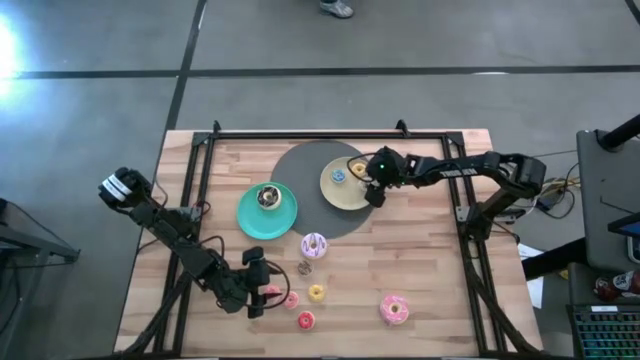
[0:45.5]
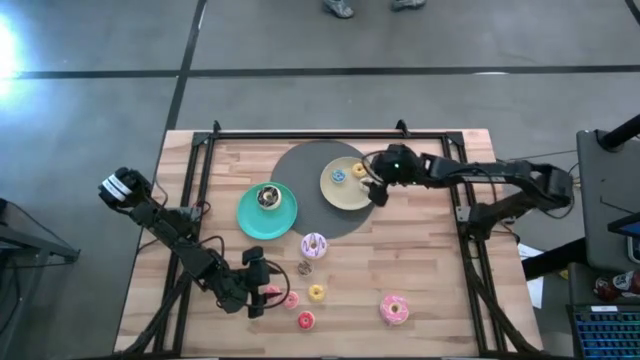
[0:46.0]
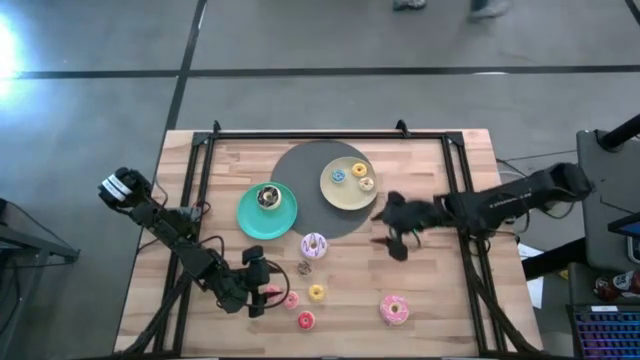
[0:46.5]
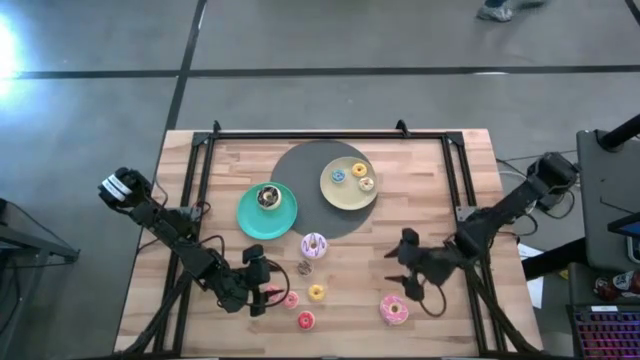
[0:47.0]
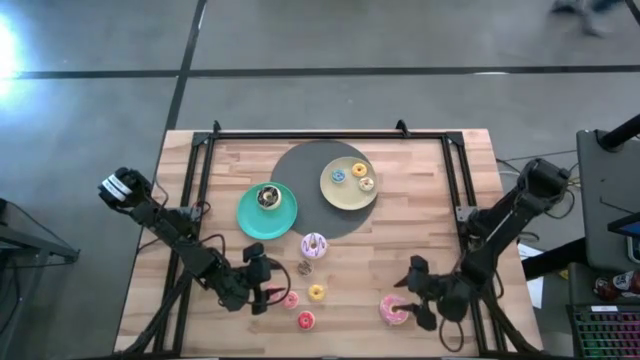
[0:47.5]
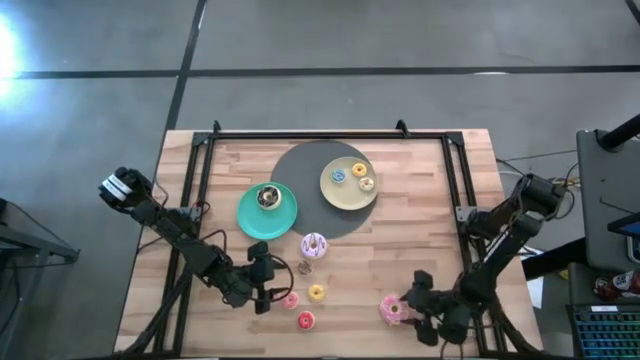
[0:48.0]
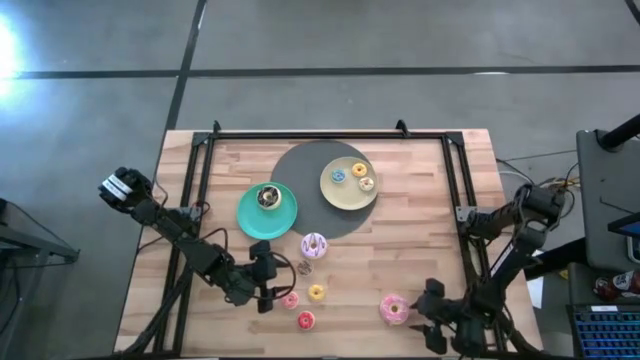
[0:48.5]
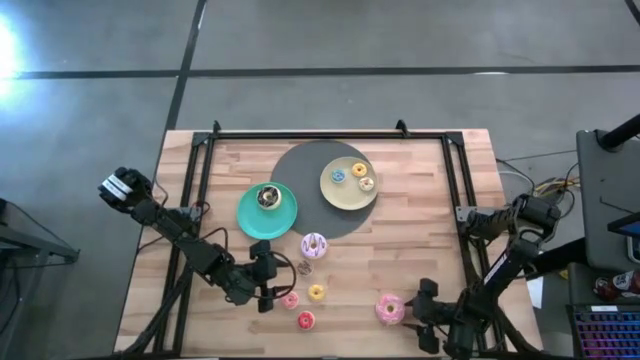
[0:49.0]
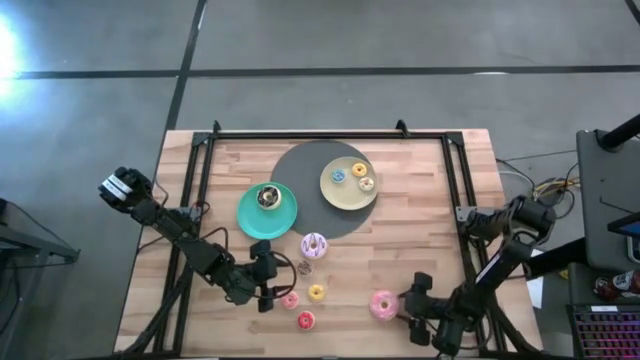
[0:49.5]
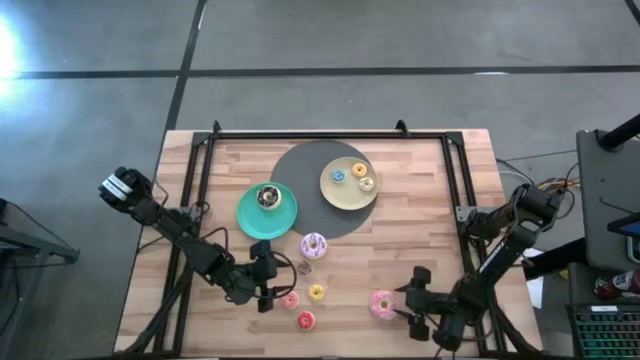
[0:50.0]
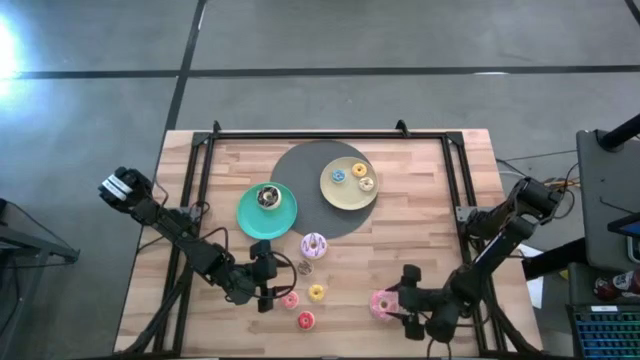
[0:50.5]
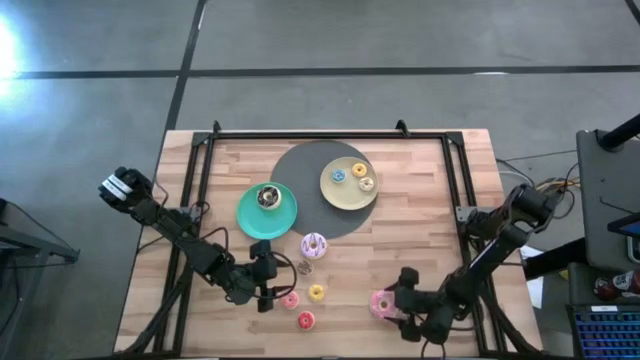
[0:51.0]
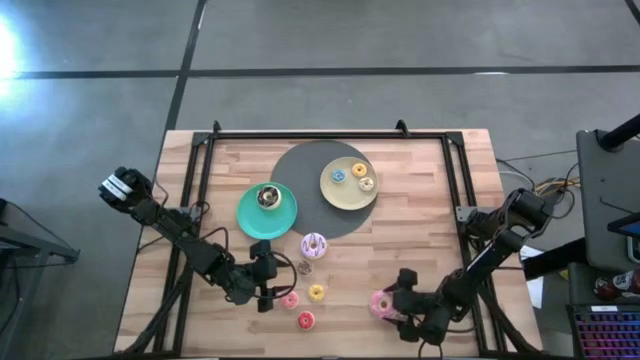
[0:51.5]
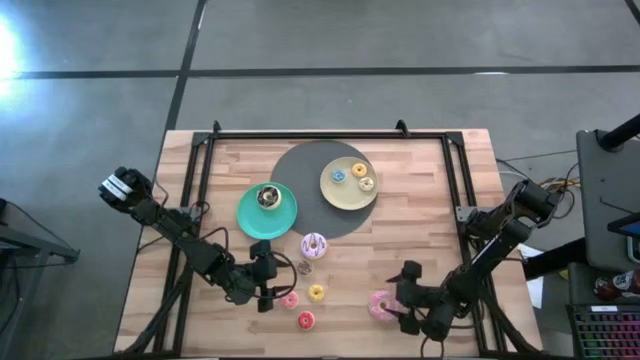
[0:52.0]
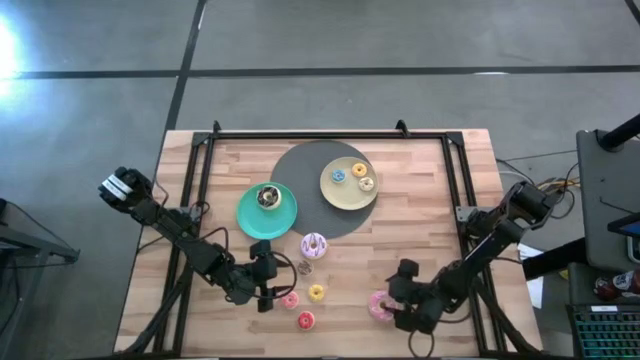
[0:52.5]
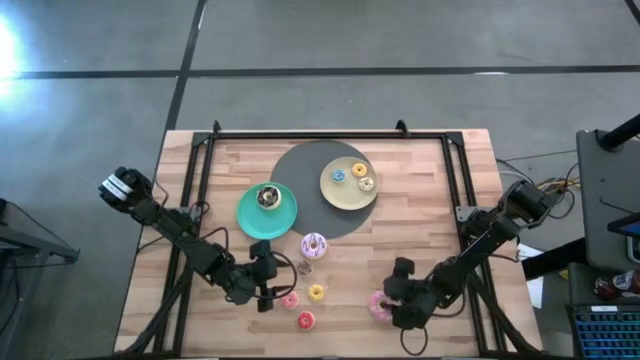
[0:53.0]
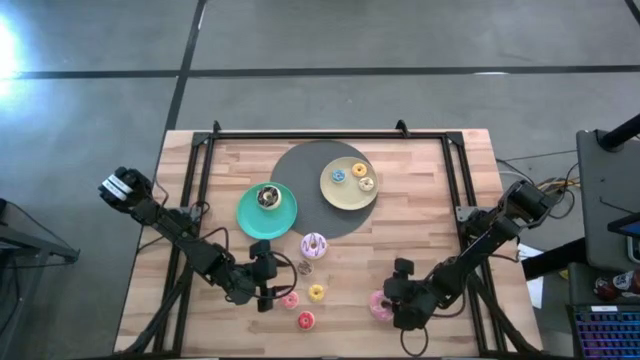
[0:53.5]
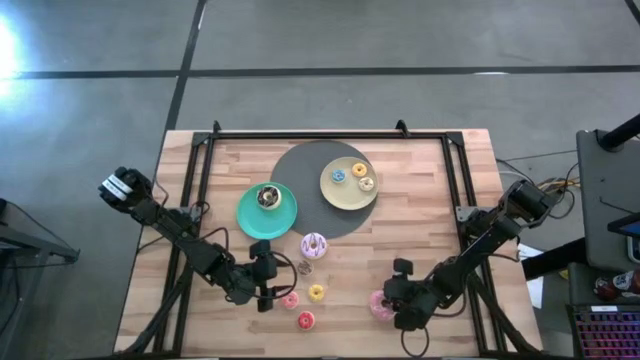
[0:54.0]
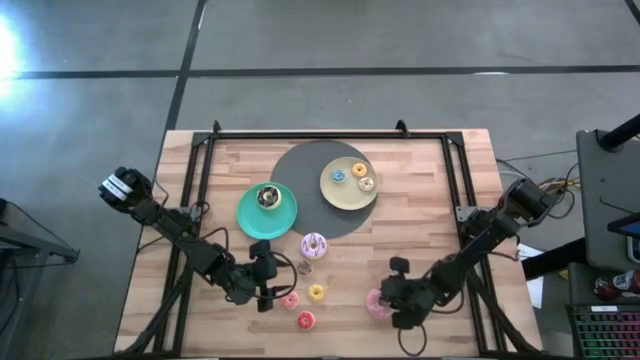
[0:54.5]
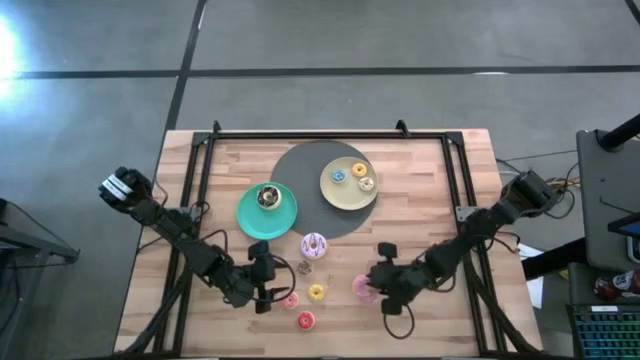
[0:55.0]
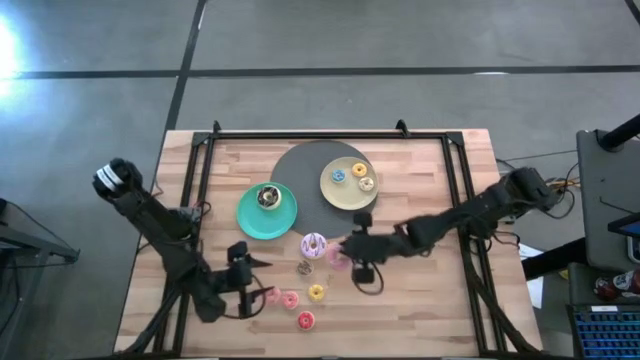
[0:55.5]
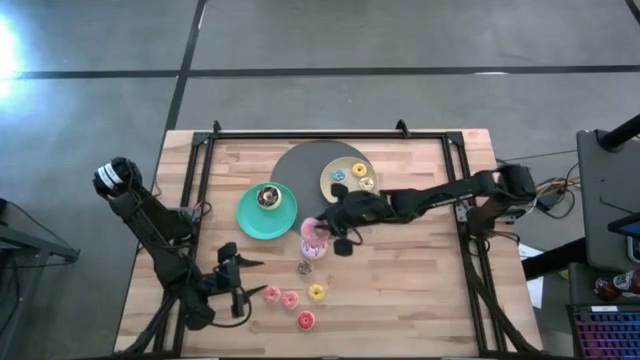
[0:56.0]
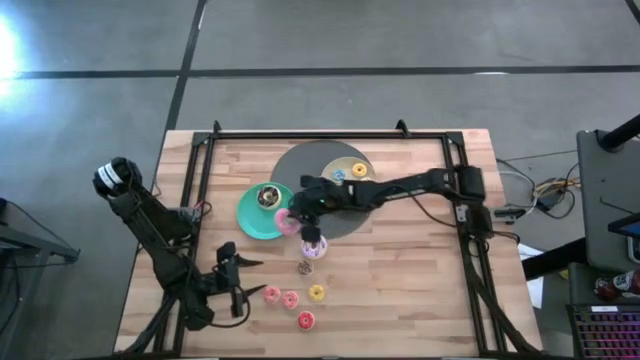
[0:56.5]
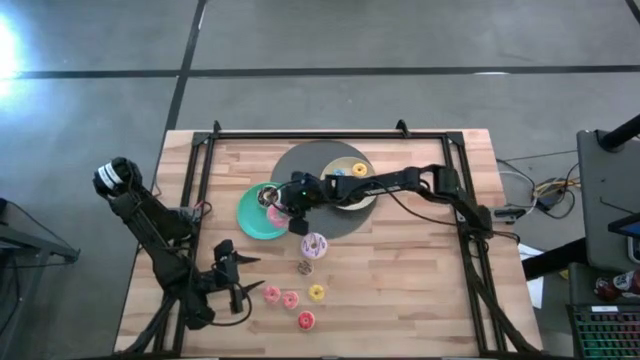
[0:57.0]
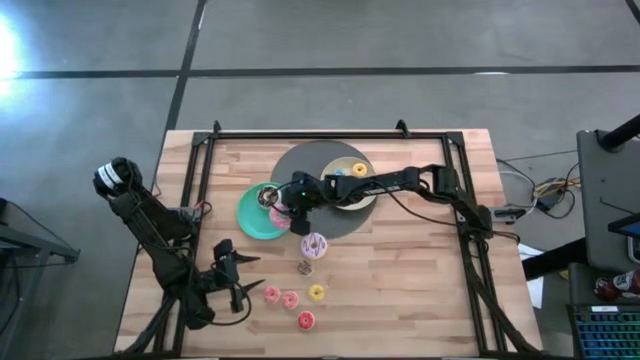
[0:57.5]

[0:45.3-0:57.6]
Task: Pick & Place donuts
Put the large pink donut on the green plate

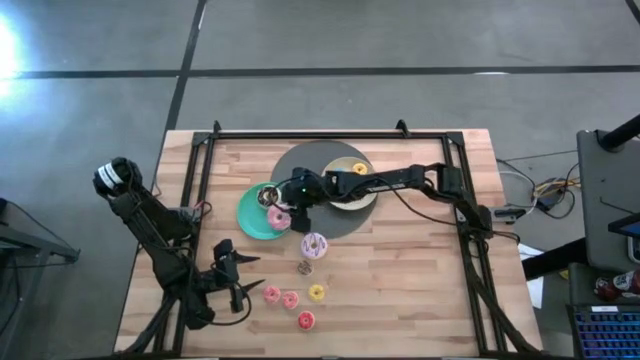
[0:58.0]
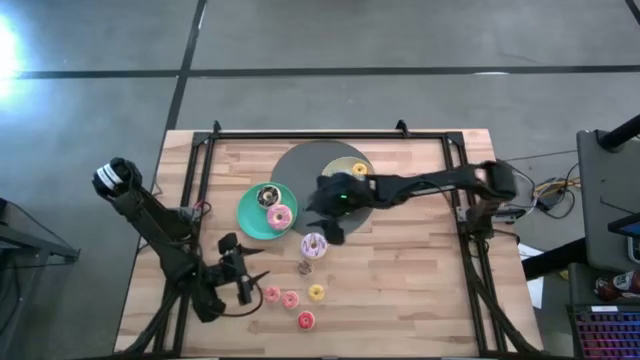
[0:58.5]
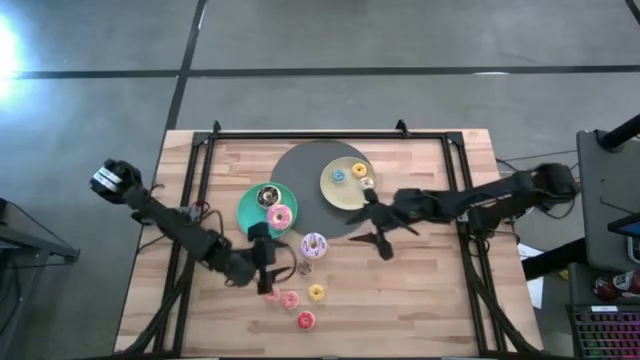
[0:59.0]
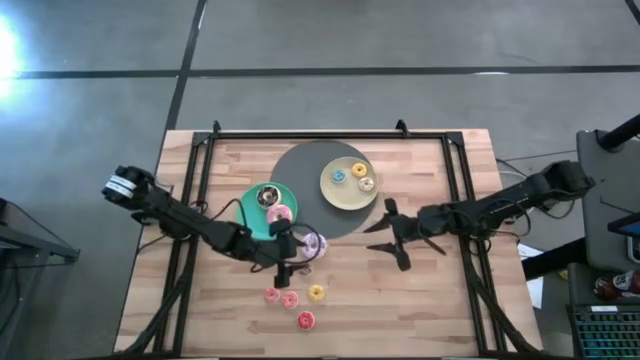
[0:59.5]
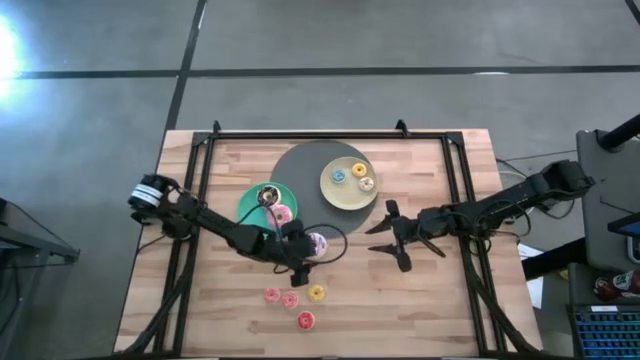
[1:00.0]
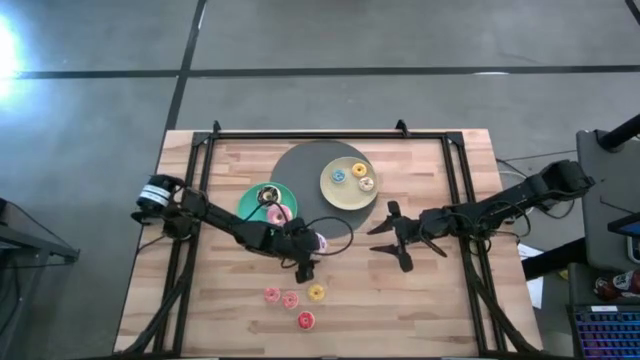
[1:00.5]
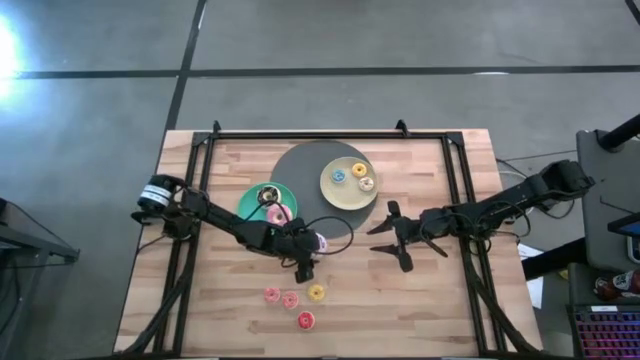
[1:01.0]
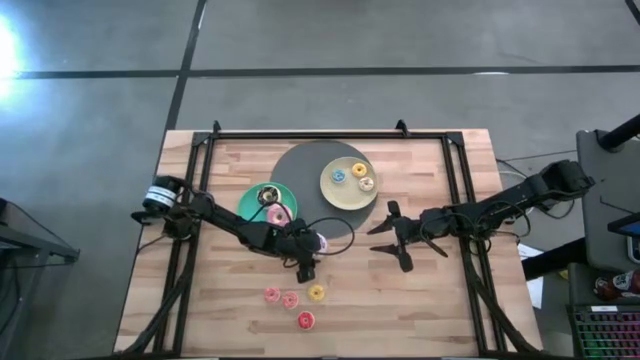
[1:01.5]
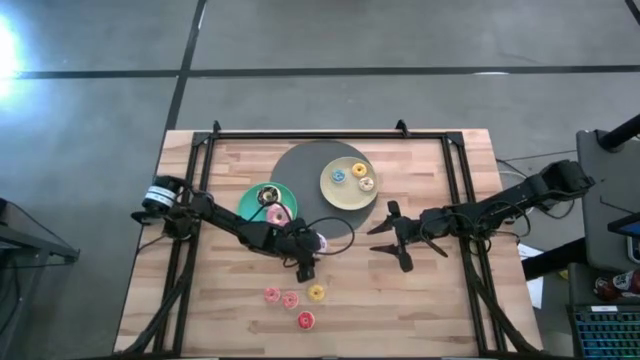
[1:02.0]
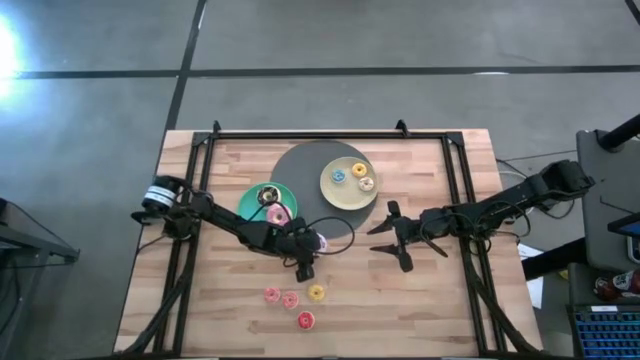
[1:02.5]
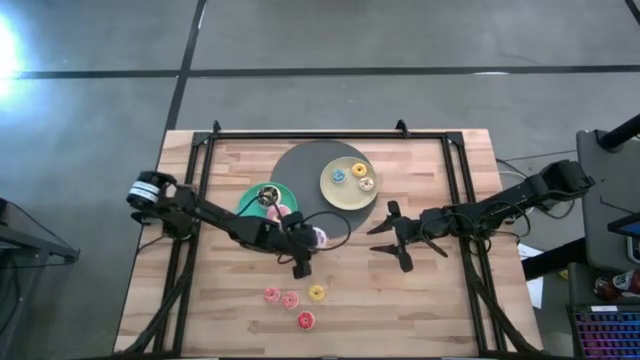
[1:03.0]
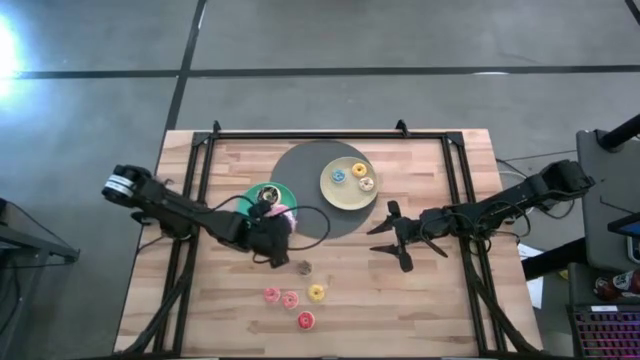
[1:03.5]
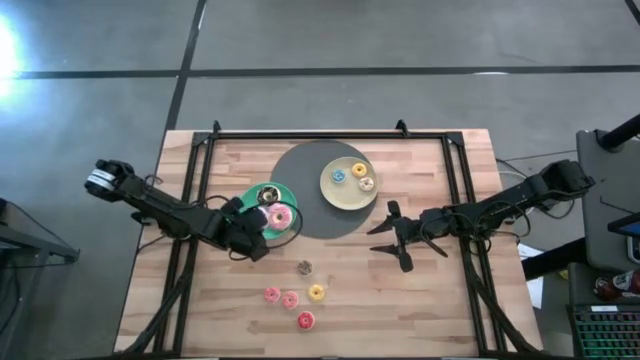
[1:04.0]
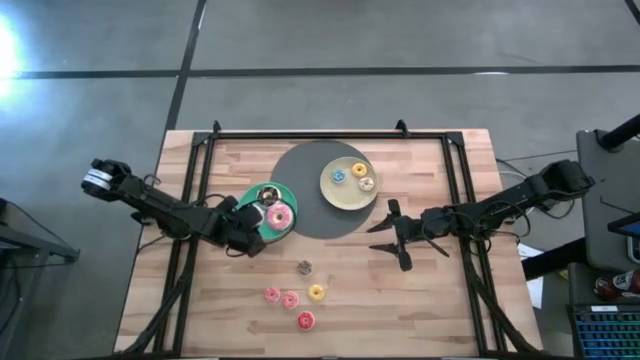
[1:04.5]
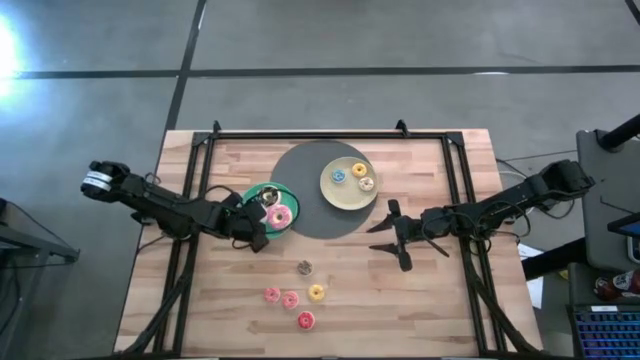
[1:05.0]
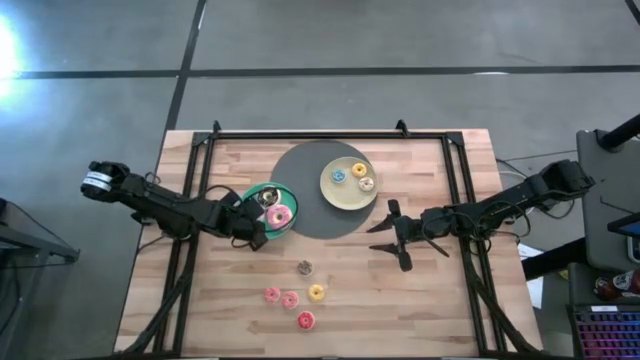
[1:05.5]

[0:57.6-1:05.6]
Put the large purple donut on the green plate

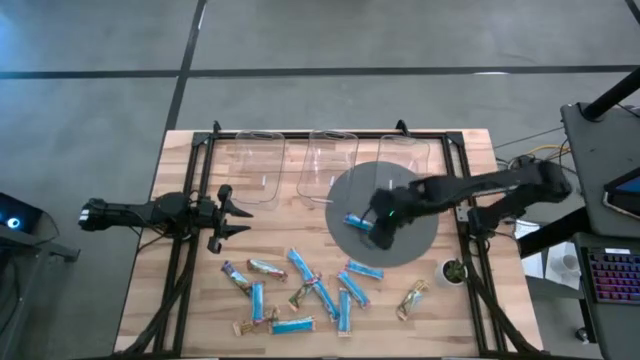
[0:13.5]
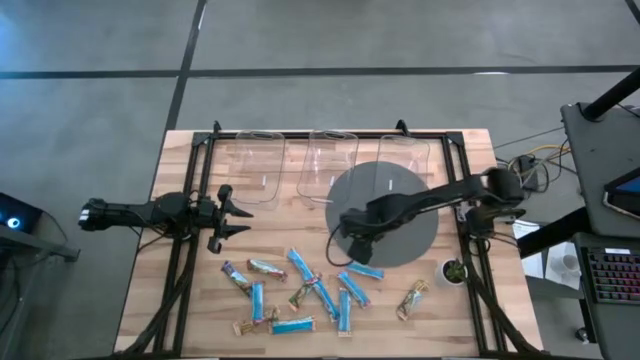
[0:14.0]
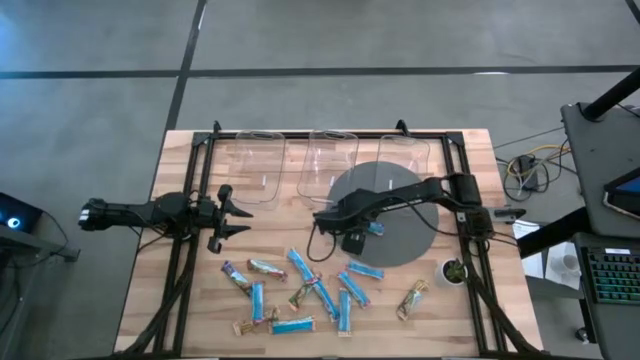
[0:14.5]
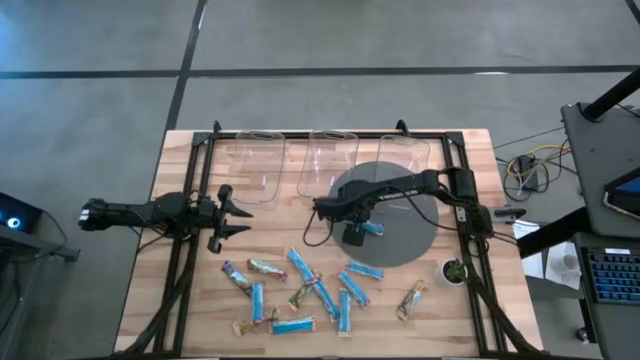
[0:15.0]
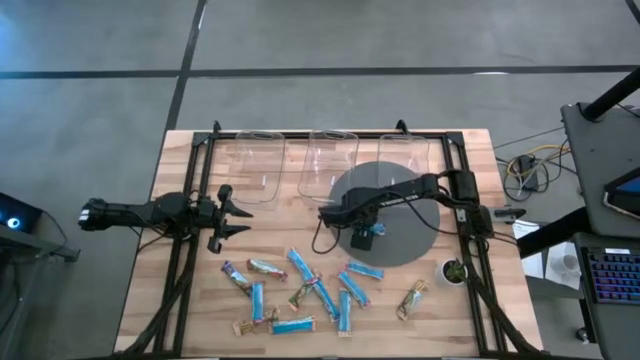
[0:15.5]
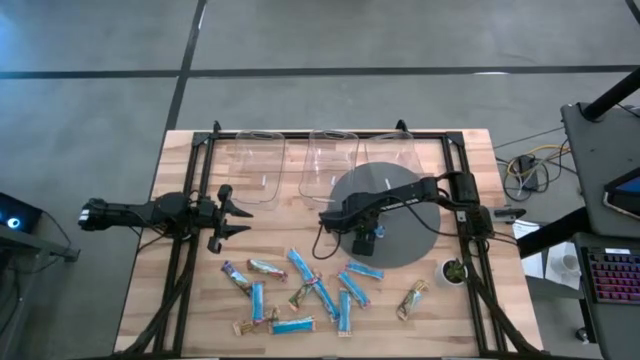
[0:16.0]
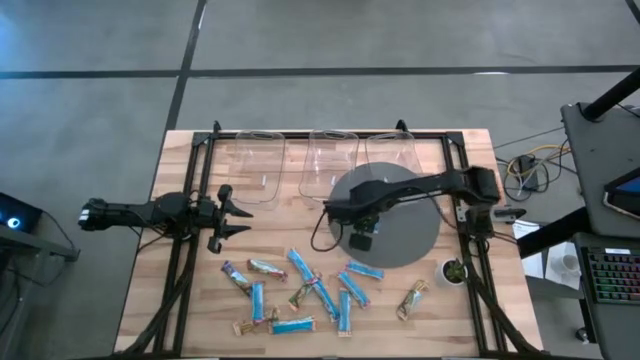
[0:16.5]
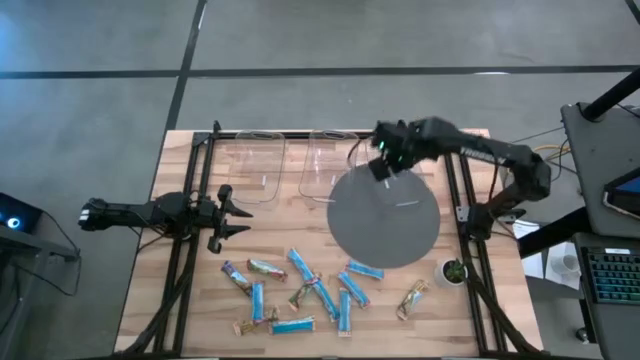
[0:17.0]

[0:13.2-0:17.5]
Task: Pick and place Granola Bars by type
Put the blue granola bar into the right transparent bin
